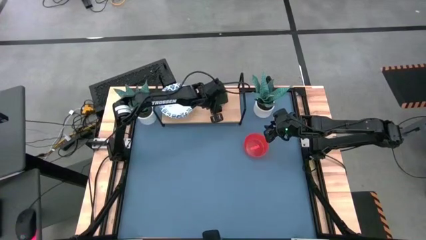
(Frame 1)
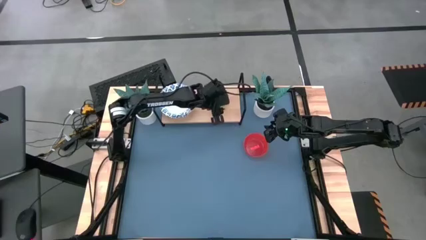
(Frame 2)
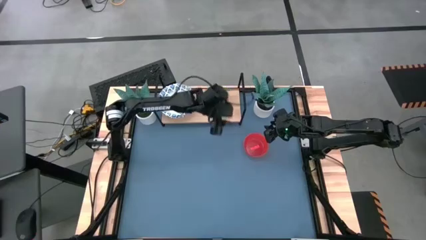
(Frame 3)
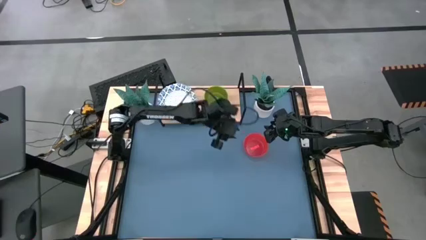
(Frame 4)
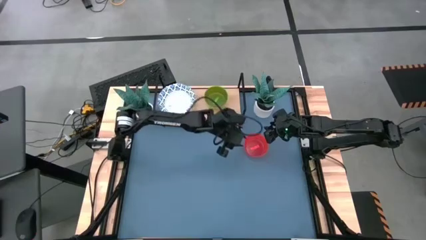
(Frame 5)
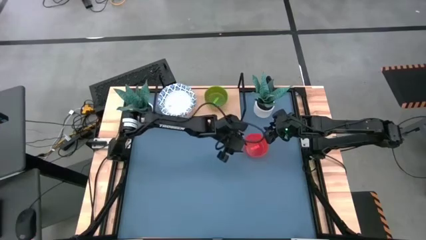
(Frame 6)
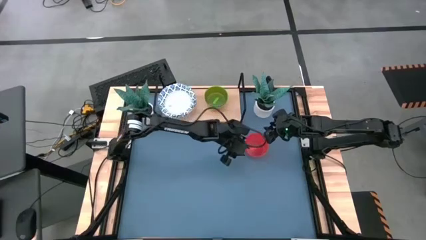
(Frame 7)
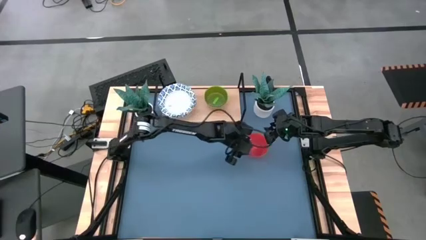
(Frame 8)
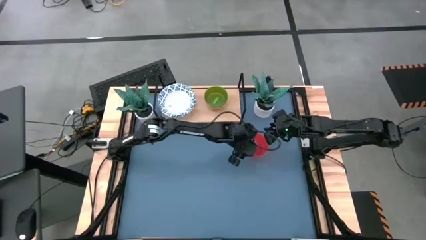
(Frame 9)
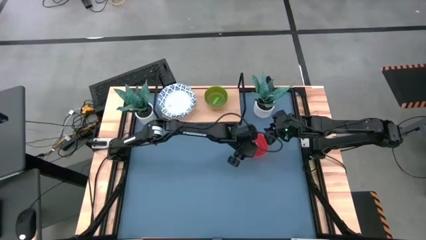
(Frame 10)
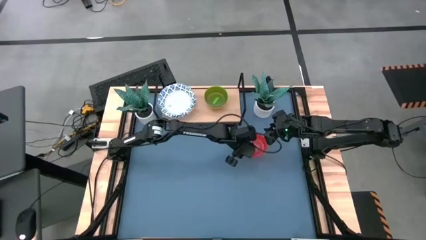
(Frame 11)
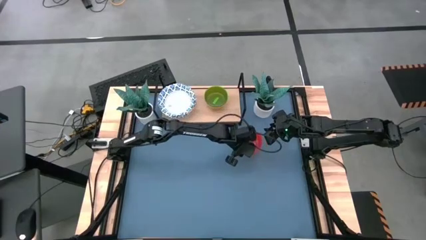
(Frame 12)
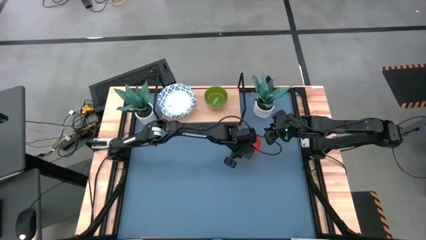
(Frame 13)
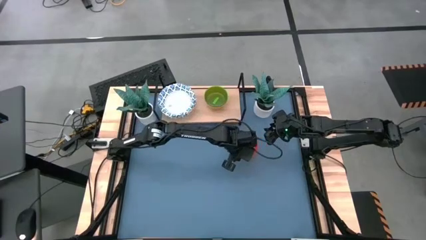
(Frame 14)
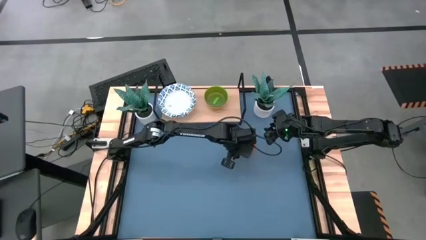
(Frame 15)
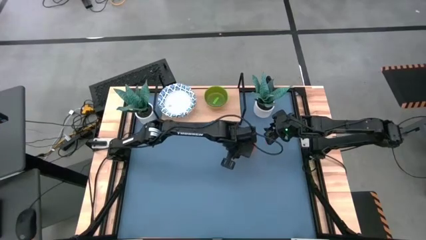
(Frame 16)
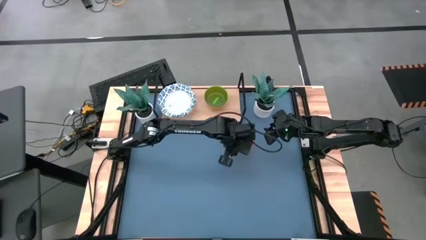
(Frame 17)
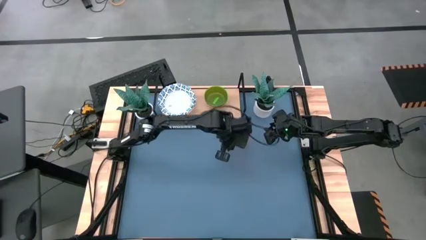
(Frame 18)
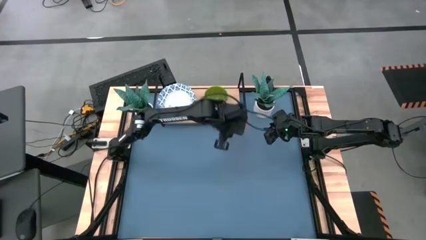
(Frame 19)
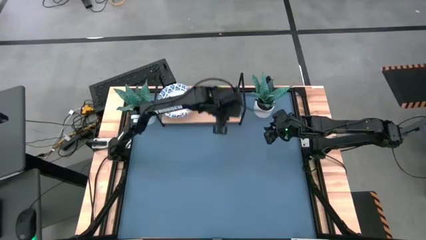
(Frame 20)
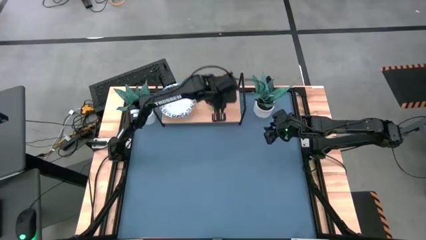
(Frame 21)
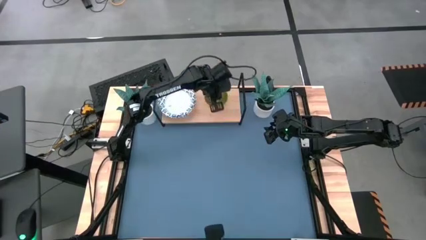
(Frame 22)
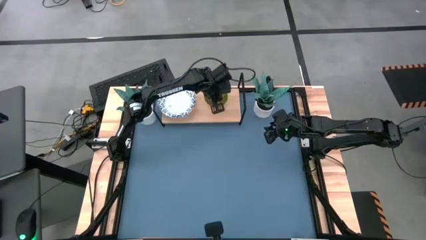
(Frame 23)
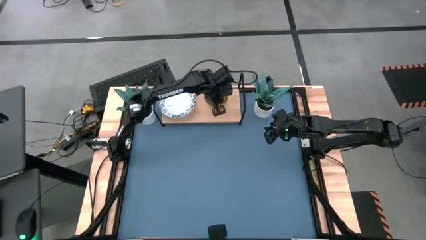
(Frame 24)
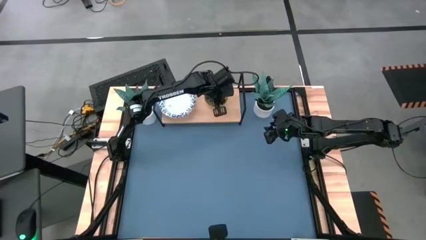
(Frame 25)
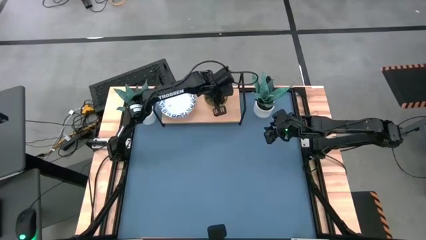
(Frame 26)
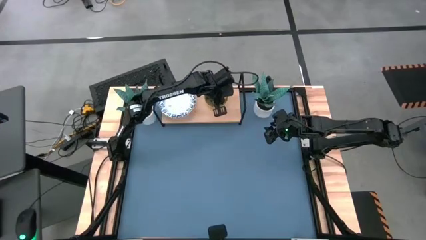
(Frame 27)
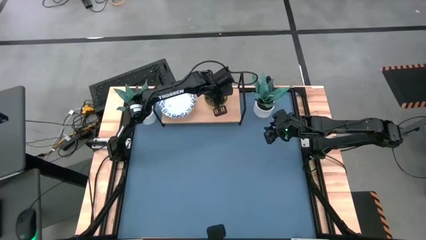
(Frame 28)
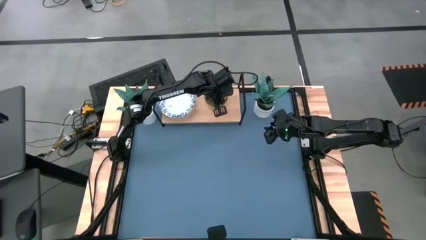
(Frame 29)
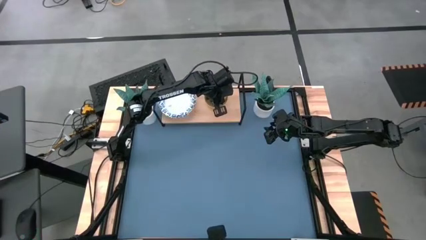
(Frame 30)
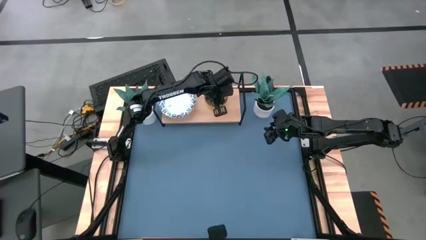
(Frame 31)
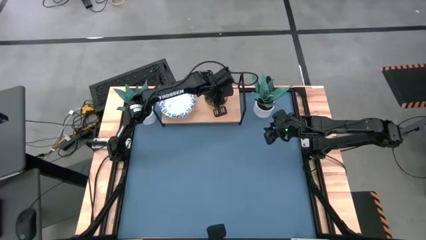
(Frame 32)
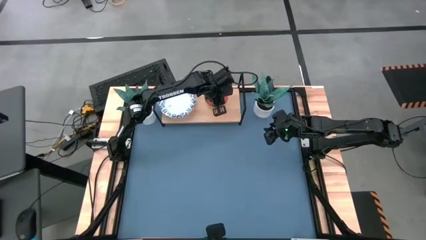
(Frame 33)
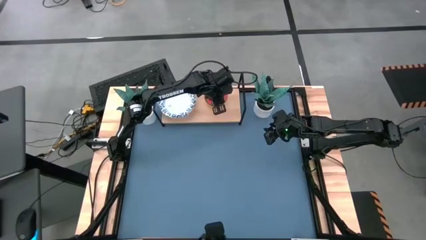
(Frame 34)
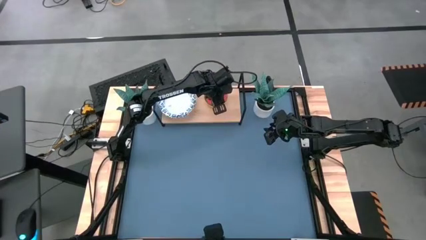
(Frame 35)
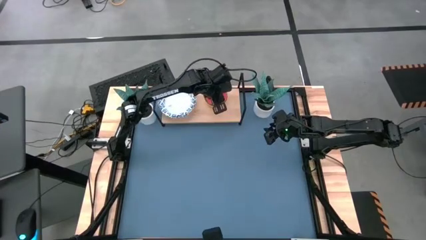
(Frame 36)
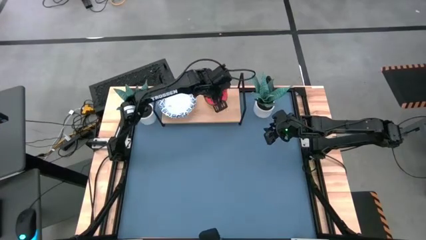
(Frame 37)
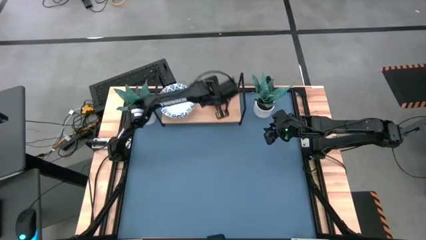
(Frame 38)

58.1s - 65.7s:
Task: Place and stack bowls onto a shelf
Stack the orange bowl on top of the green bowl

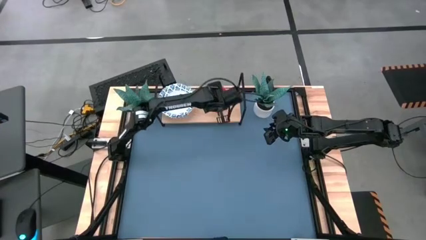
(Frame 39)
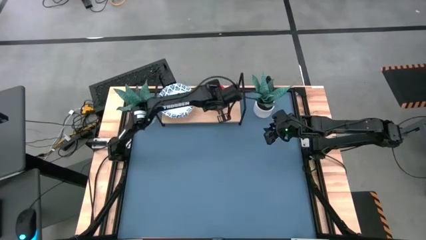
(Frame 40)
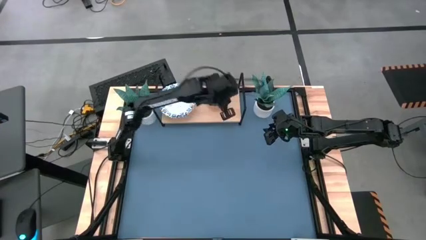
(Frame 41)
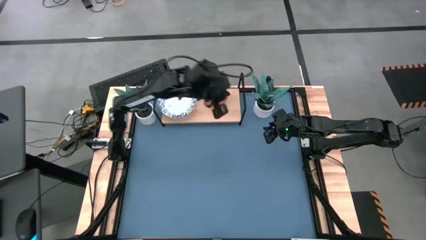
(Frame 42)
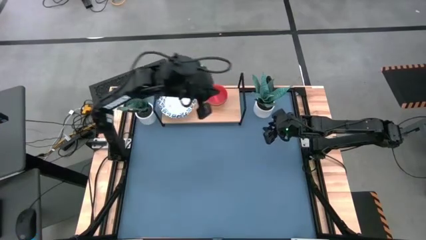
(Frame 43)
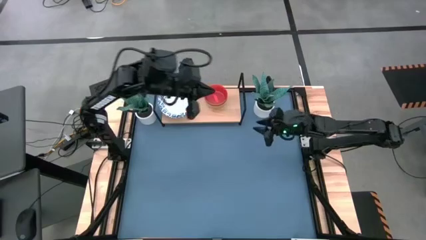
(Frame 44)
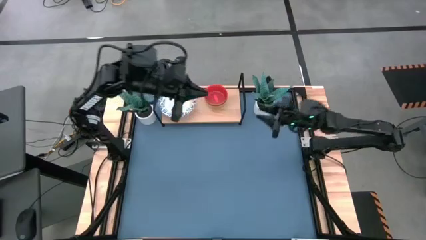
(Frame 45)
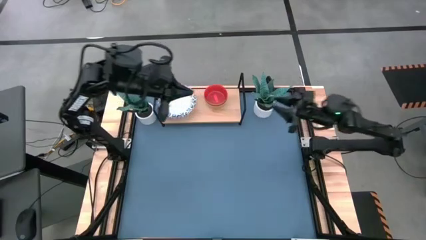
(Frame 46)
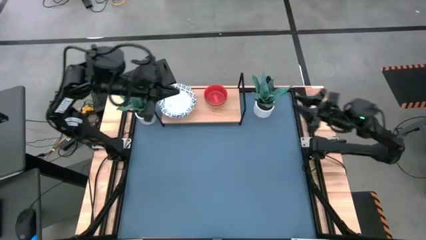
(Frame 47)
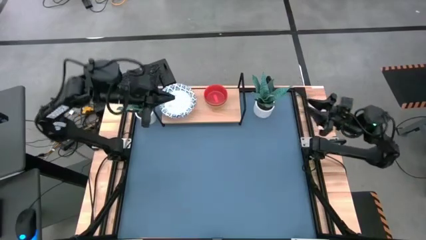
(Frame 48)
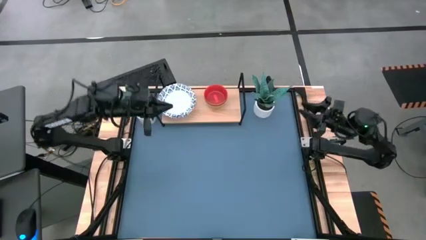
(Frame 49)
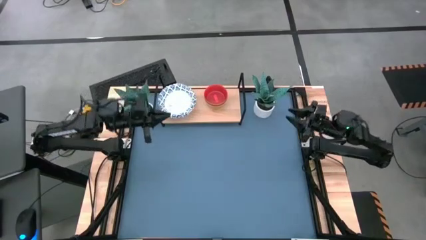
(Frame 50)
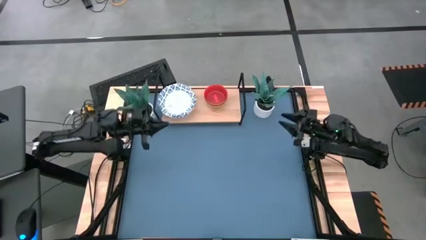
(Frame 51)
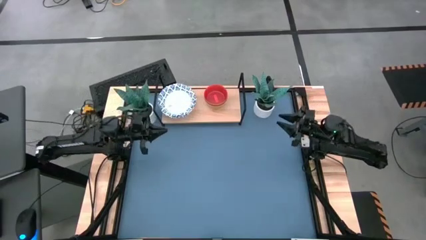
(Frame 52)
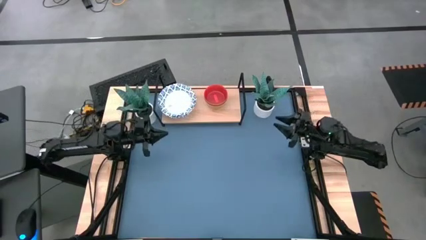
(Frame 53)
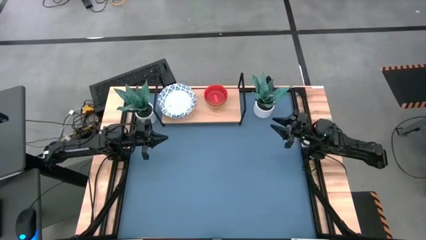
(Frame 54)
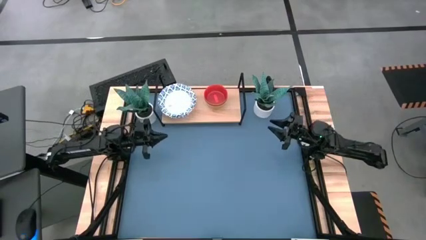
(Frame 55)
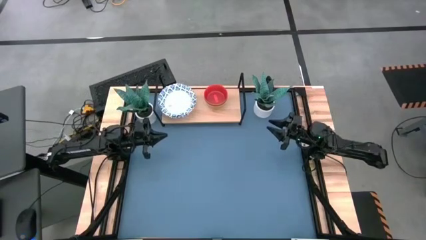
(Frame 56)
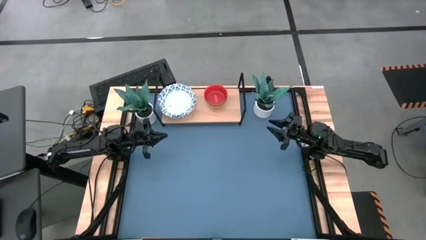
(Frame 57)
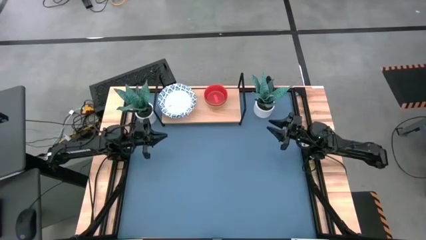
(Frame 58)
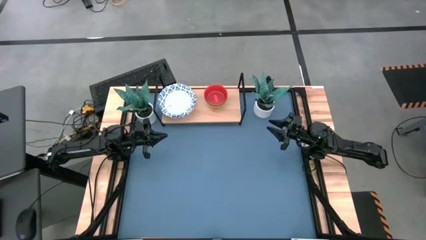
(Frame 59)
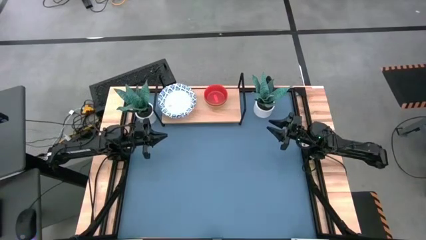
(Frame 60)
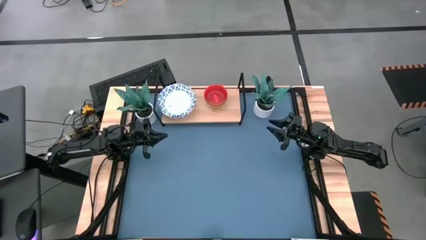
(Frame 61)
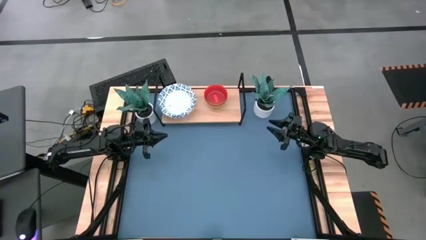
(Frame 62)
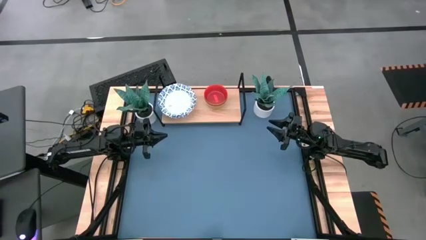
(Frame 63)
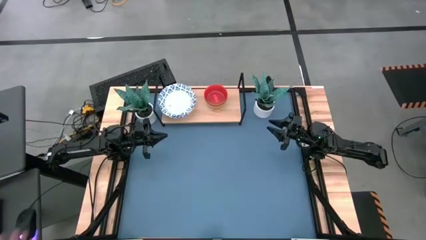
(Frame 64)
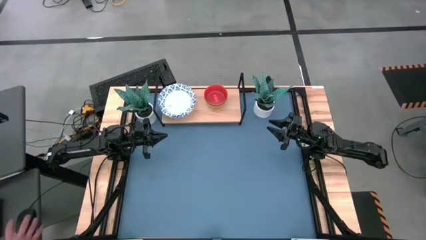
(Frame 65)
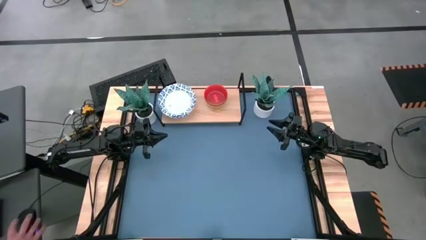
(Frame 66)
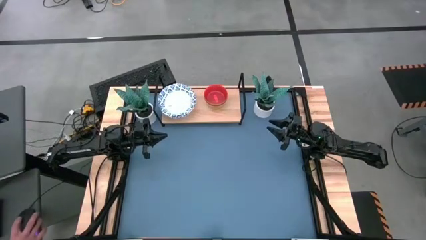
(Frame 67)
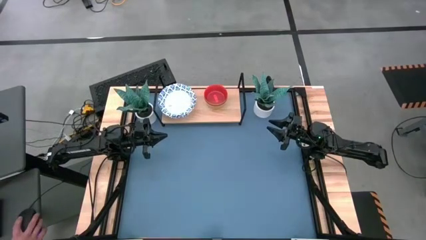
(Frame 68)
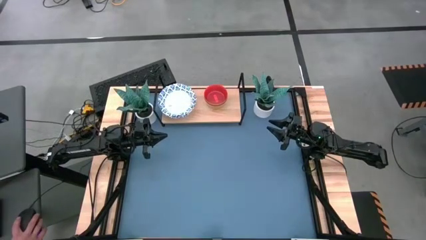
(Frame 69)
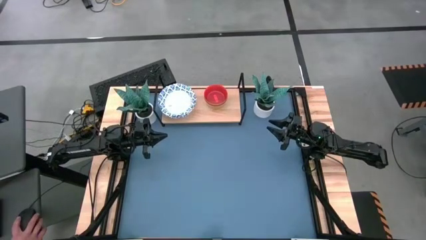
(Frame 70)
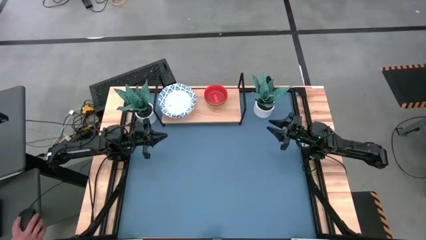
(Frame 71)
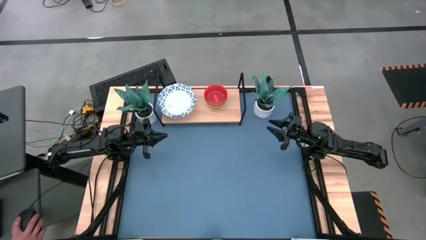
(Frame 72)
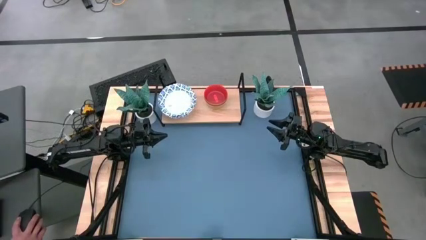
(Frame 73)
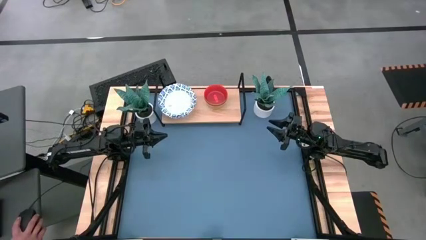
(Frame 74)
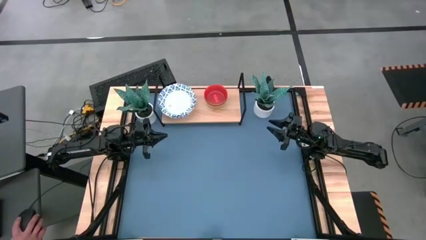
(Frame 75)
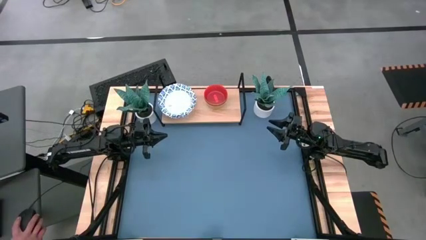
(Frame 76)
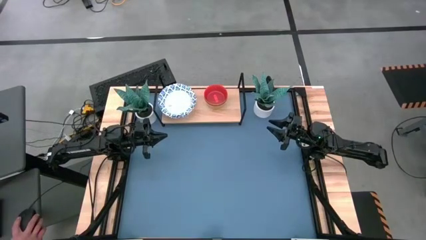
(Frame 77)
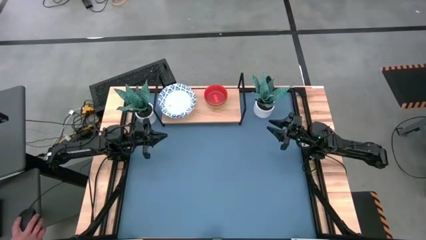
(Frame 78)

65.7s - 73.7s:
Return to Home Position

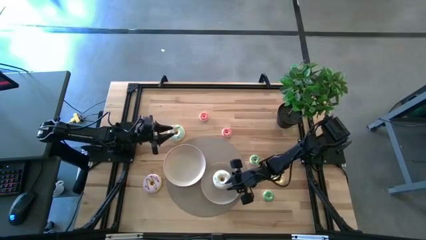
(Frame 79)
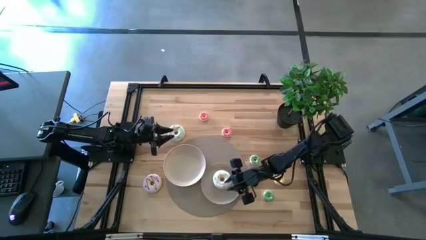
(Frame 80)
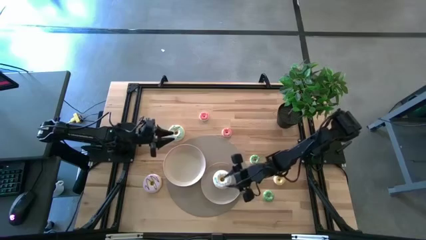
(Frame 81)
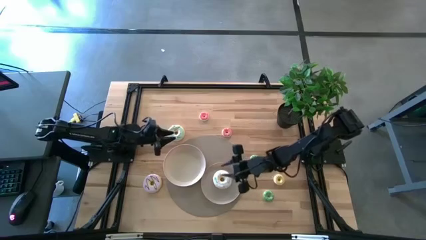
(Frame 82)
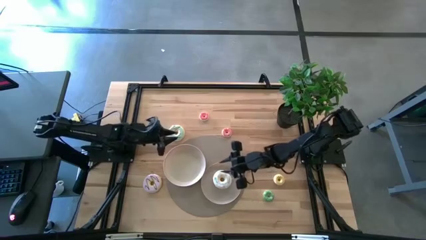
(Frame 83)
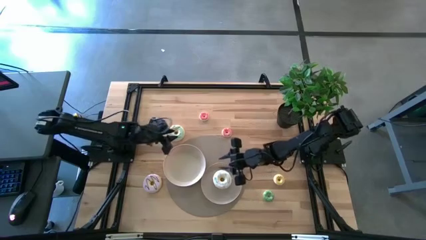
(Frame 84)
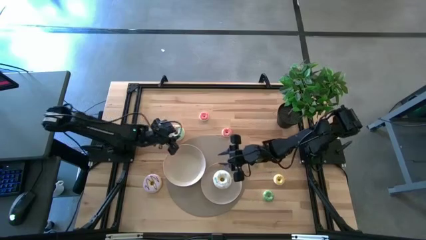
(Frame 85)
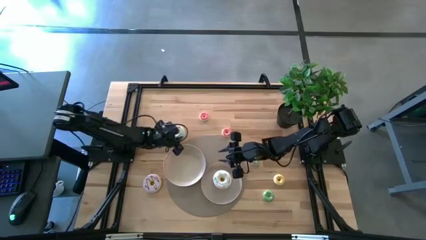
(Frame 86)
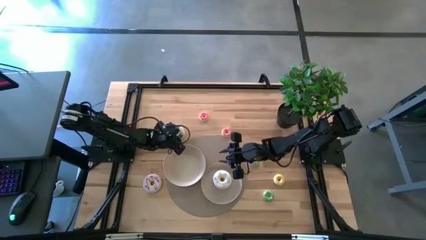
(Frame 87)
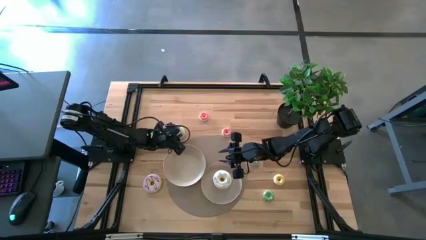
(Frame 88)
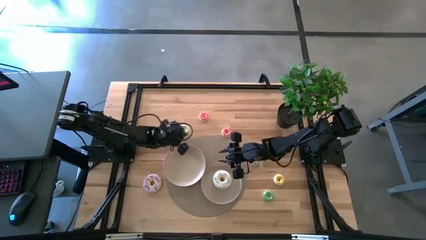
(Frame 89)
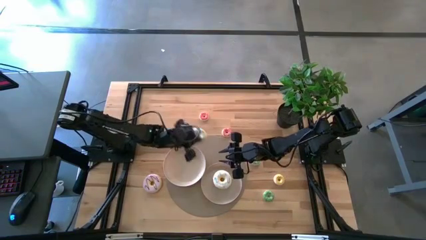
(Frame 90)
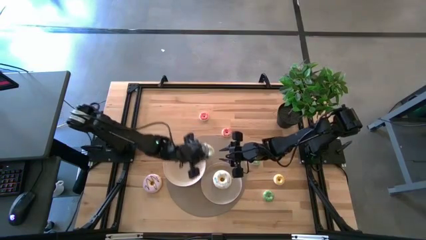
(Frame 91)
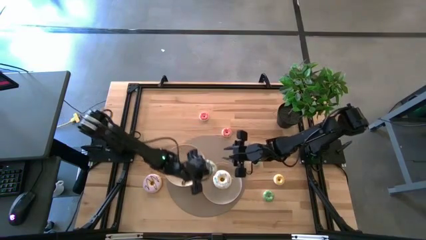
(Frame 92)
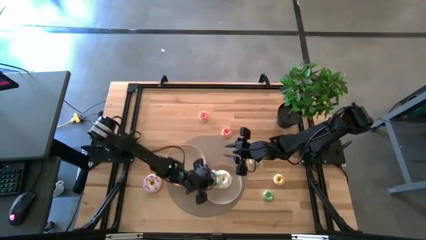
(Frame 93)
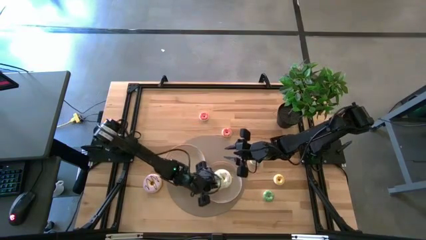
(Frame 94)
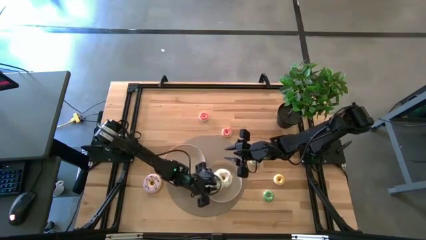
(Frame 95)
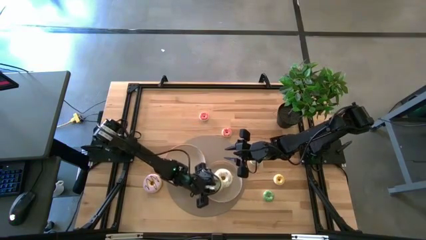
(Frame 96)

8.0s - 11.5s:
Task: Pick & Place donuts
Put the large blue donut on the bottom white plate
